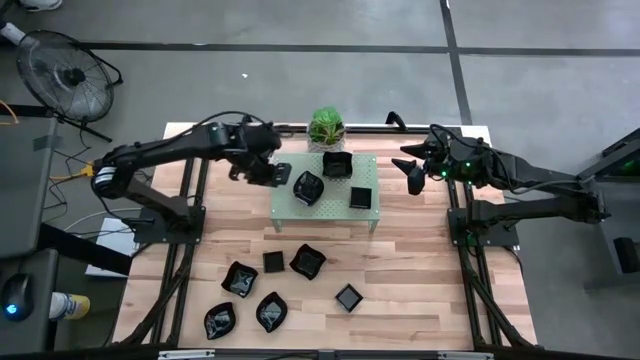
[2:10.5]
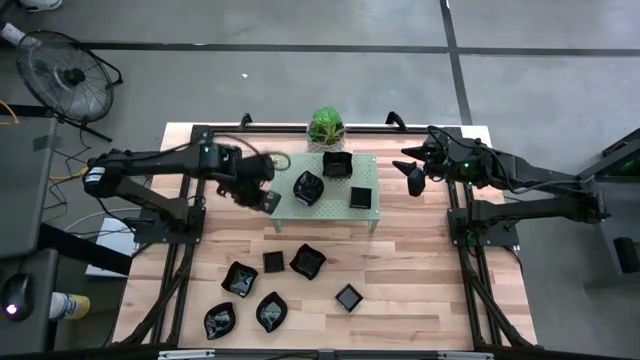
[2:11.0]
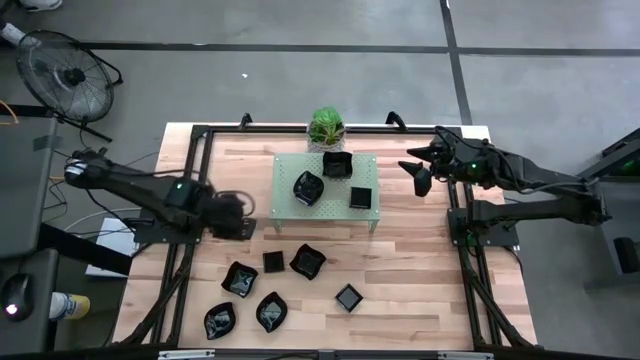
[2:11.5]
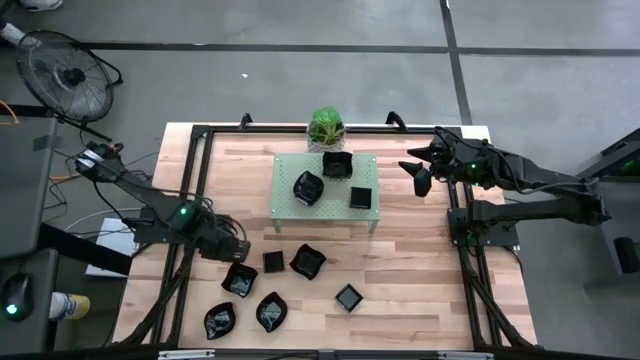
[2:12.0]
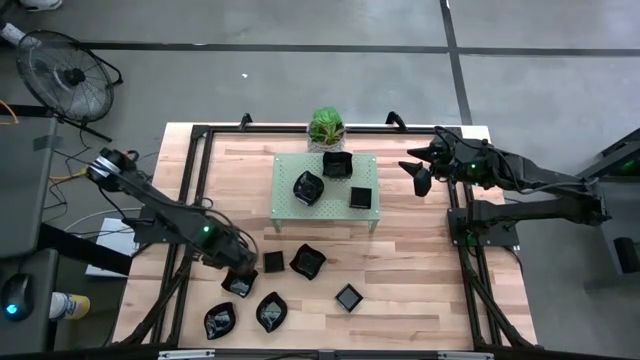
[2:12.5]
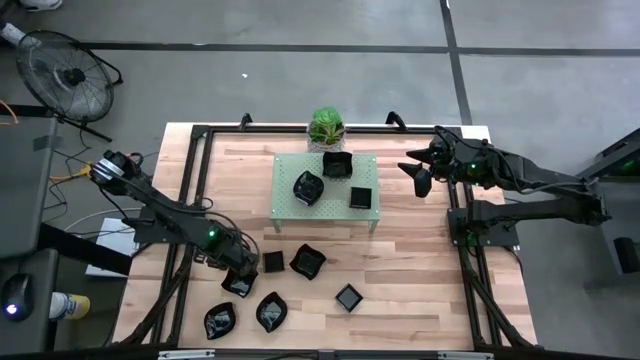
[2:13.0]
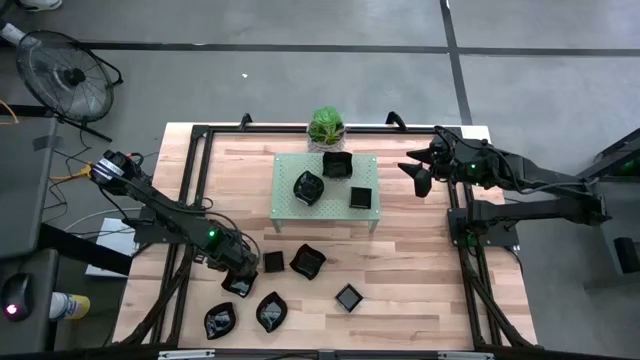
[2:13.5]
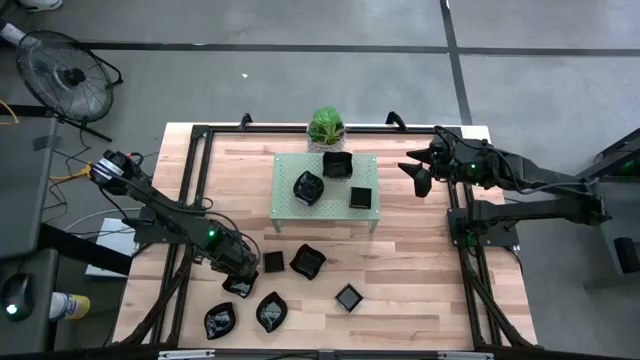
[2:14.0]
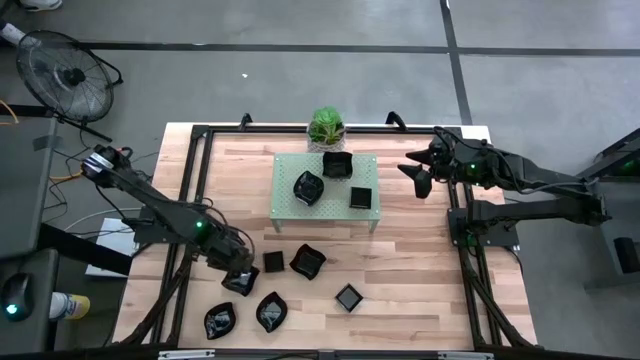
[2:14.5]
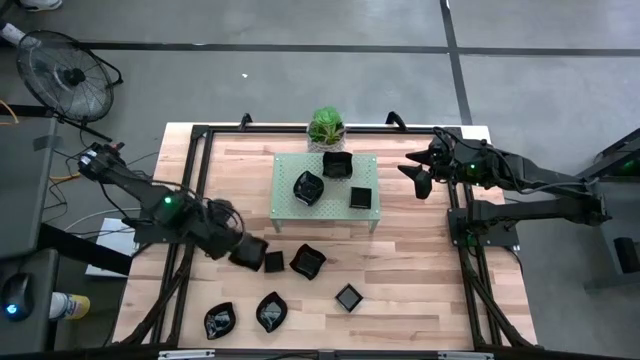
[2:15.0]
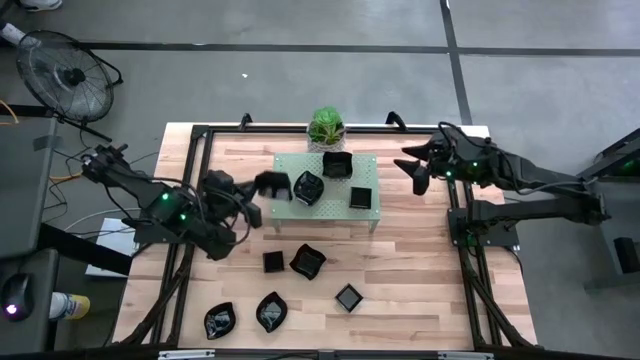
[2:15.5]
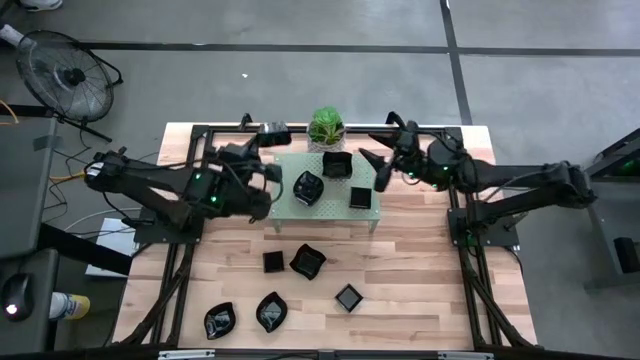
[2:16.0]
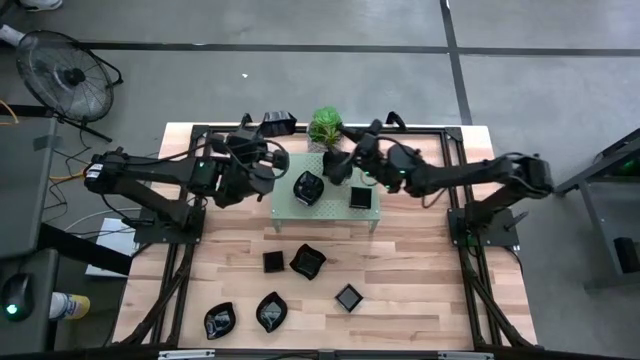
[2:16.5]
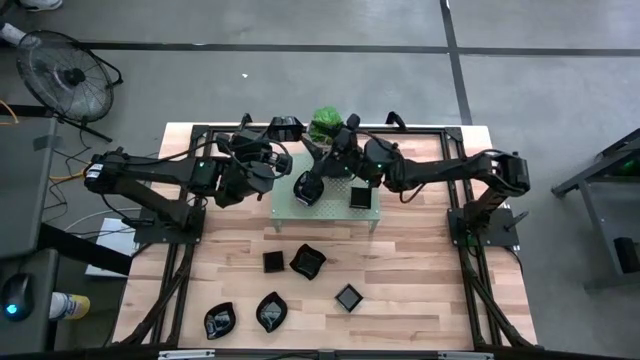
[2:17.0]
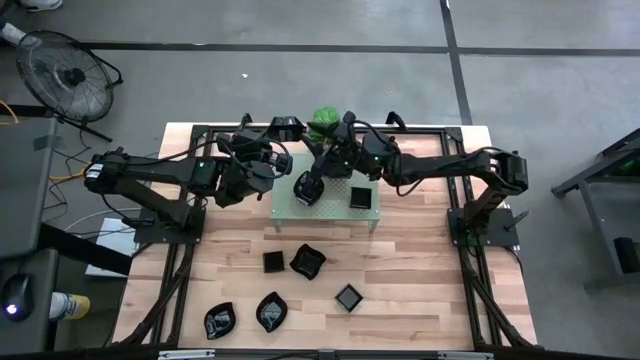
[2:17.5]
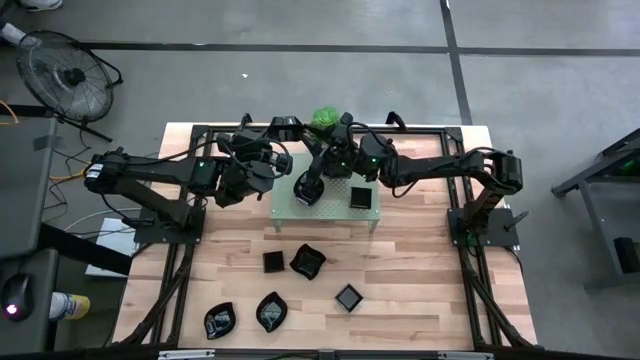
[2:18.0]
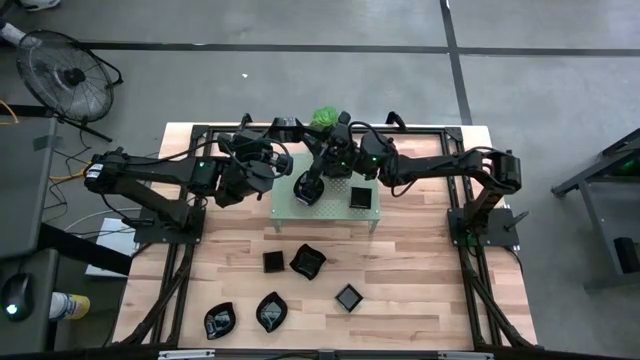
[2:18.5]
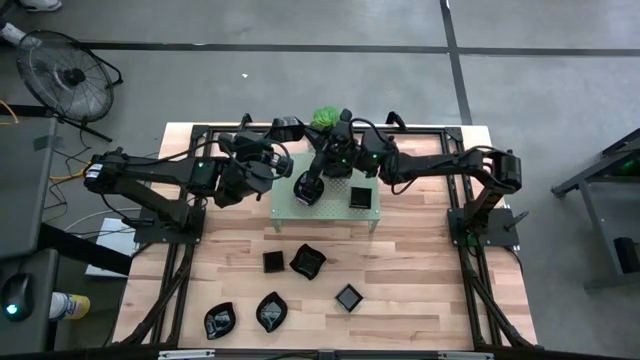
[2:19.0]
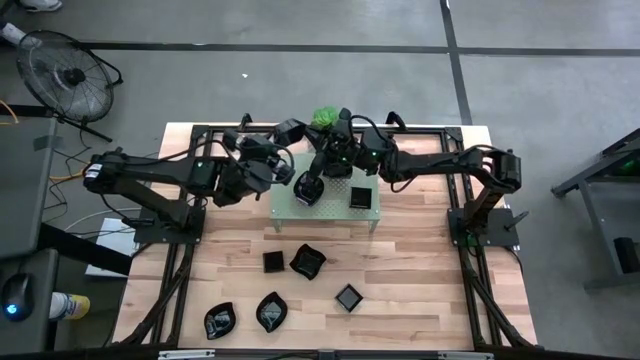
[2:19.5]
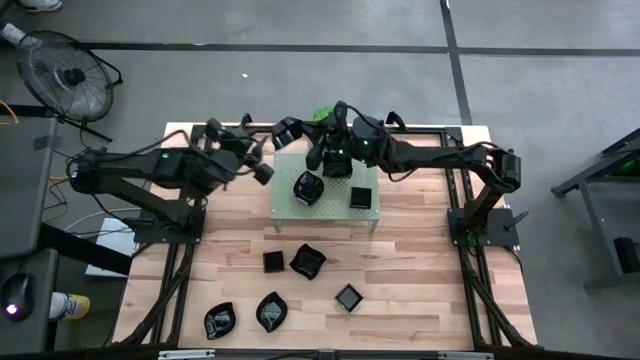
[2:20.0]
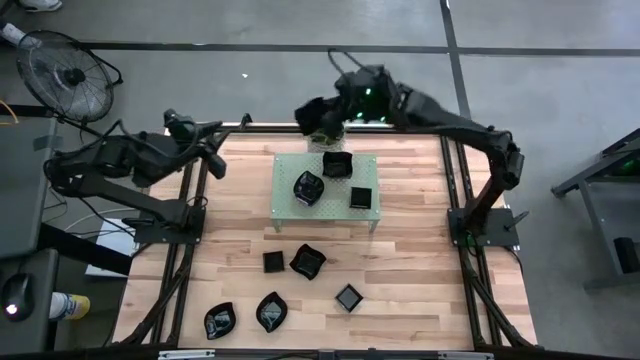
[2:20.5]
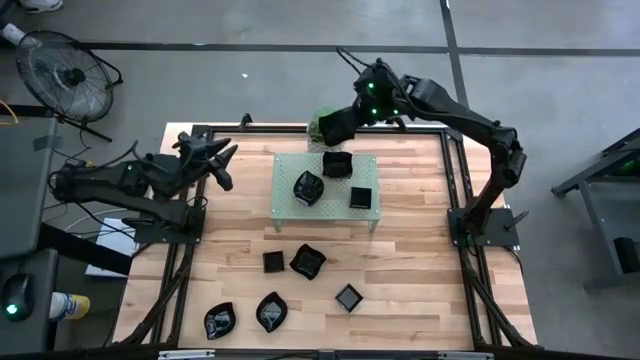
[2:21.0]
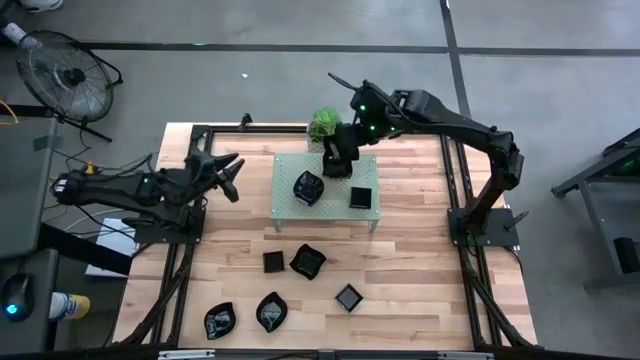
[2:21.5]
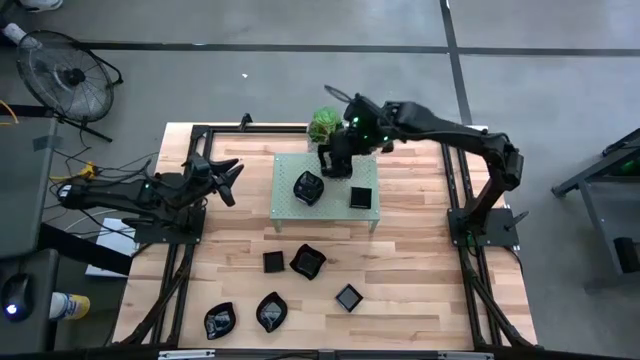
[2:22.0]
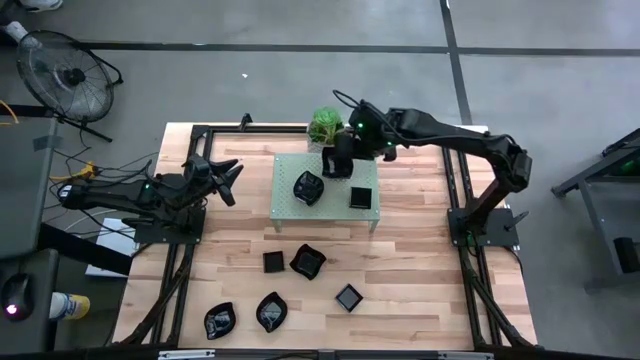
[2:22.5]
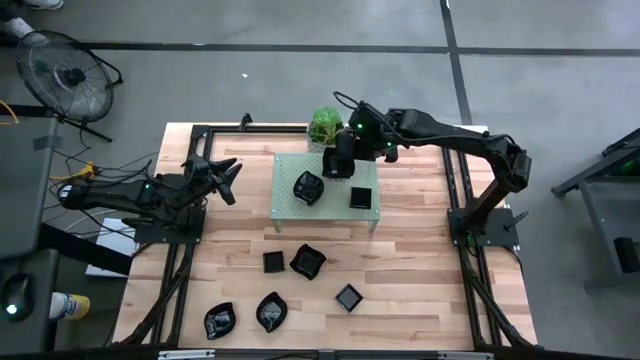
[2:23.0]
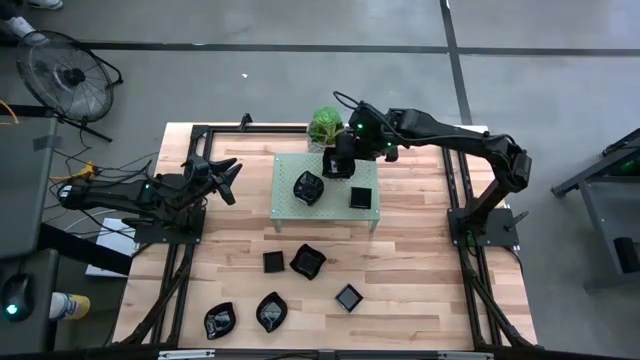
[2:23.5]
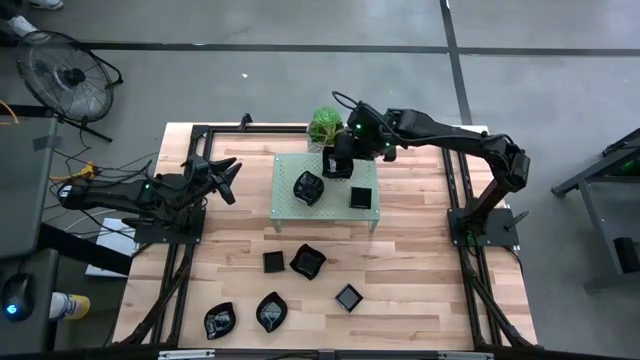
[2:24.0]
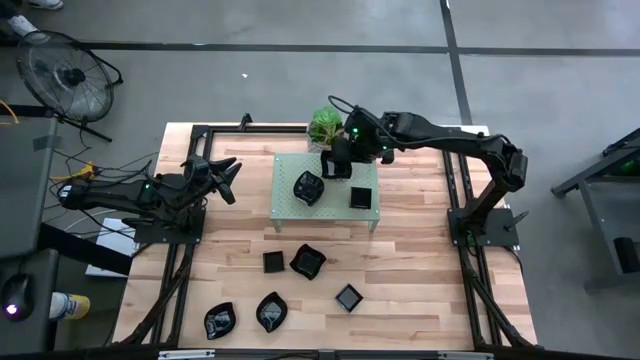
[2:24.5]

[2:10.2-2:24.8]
Task: Pick & Place Mini shaped plates
Stack the black distorted square plate on the other black distorted square plate on the shelf

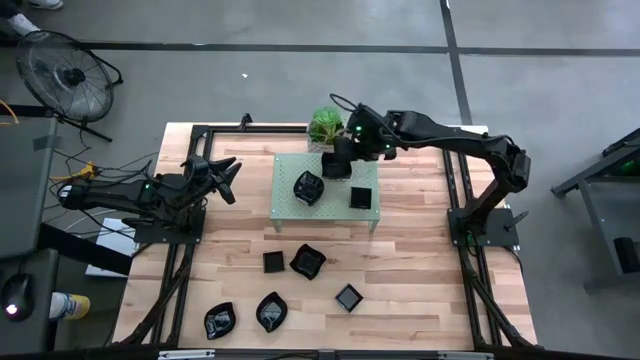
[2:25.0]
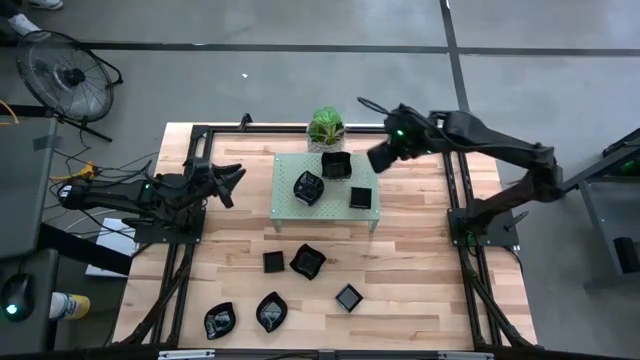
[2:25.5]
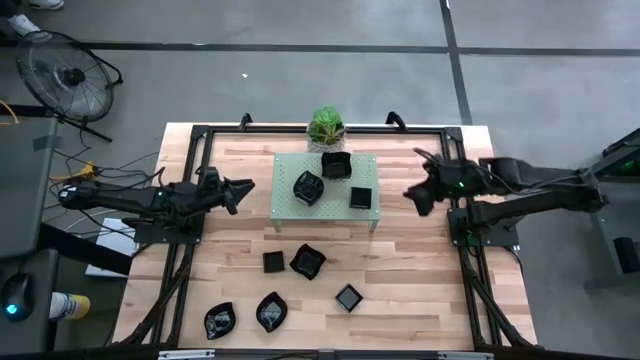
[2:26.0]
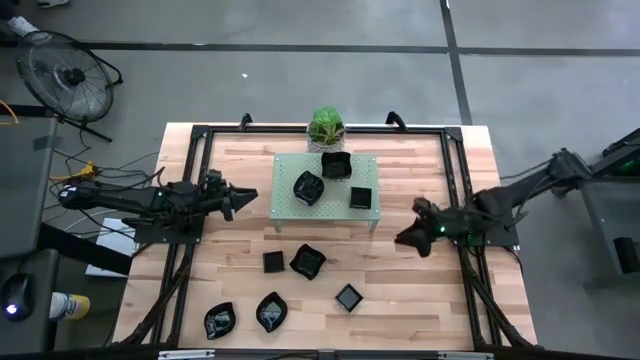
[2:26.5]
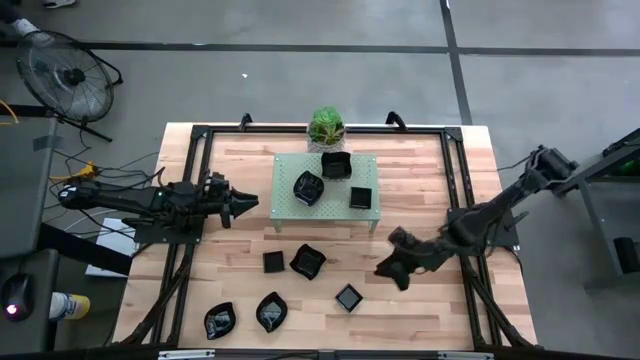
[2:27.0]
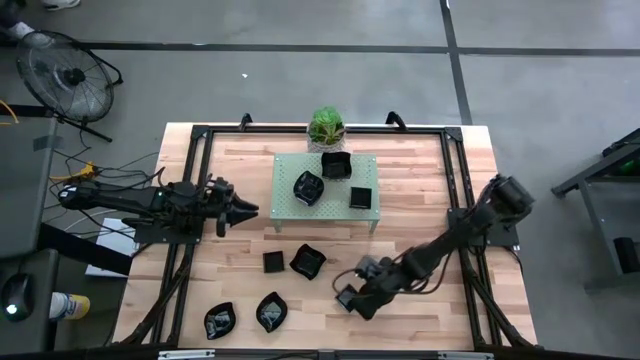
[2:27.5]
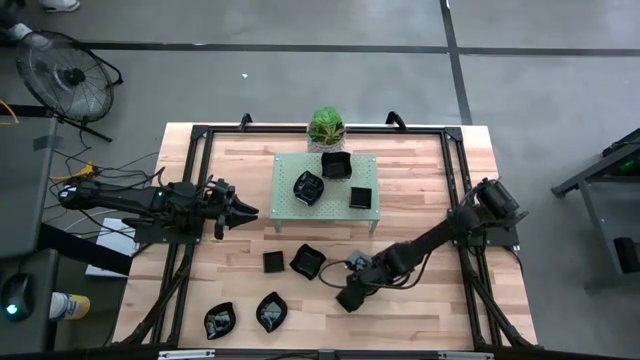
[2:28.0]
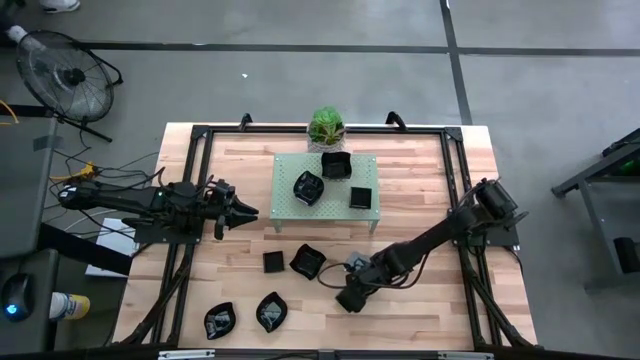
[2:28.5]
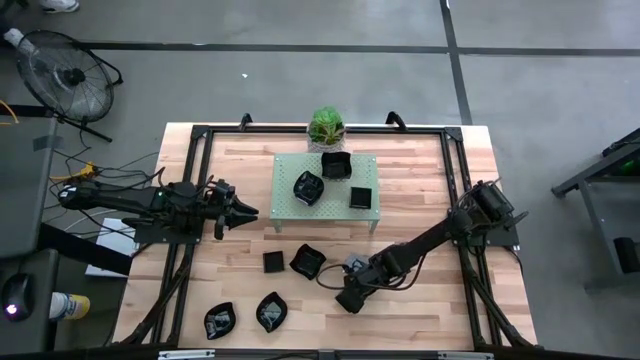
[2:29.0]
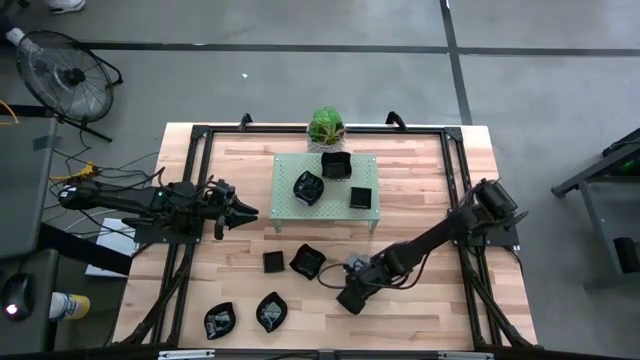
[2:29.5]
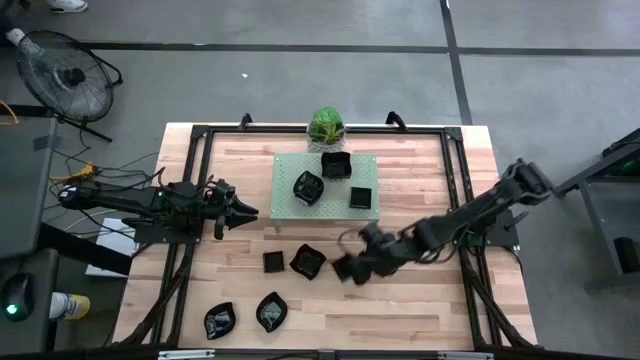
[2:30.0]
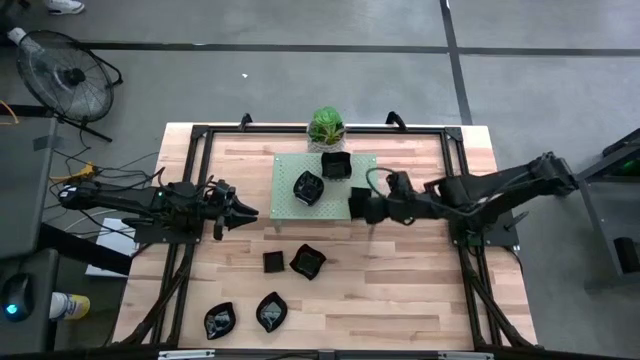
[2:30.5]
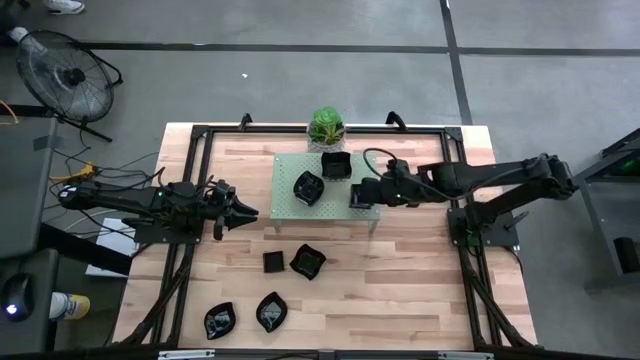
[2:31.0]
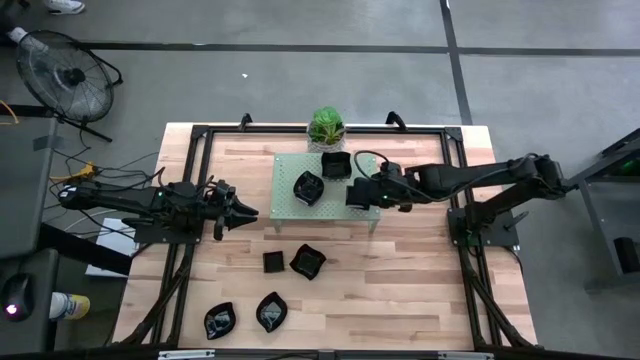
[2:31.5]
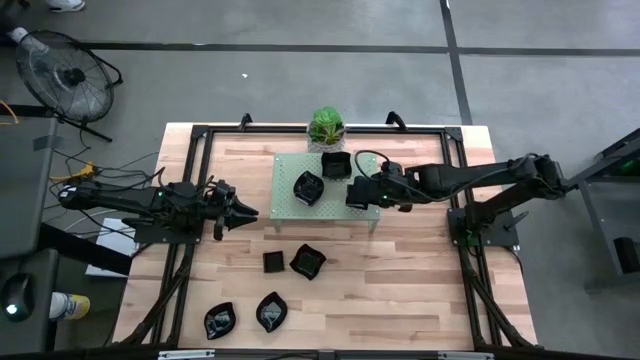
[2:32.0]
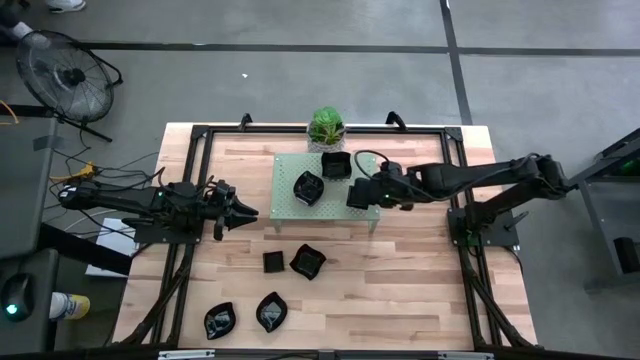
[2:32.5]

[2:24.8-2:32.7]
Stack the black square plate on the other black square plate on the shelf
